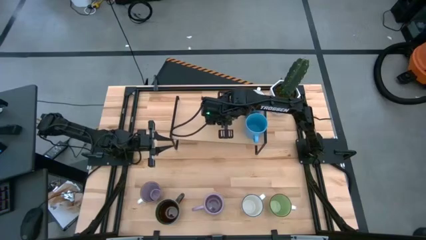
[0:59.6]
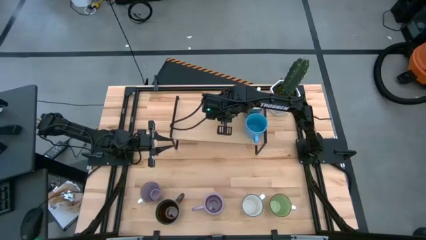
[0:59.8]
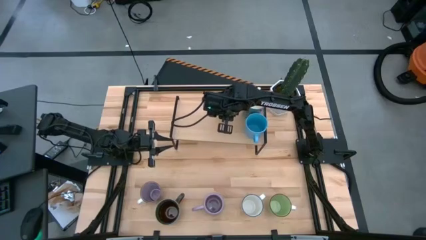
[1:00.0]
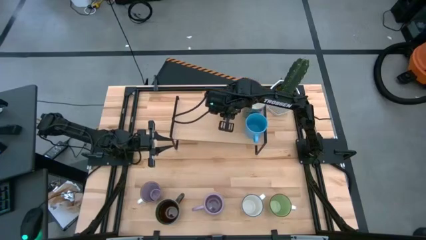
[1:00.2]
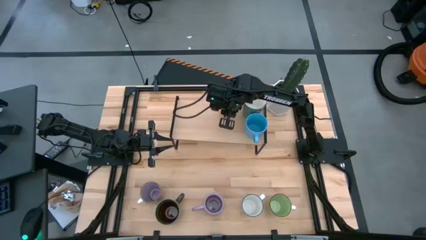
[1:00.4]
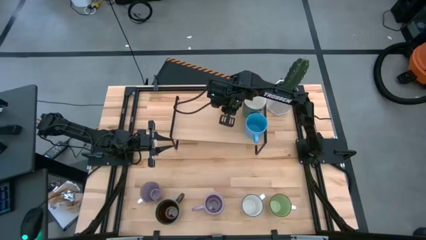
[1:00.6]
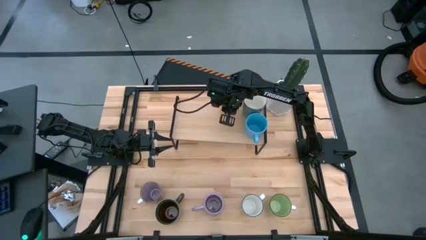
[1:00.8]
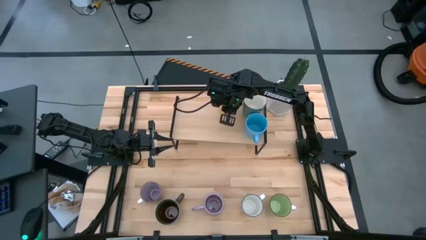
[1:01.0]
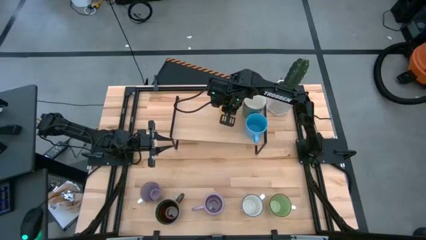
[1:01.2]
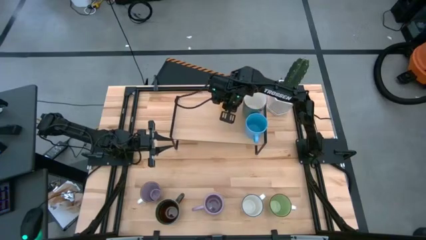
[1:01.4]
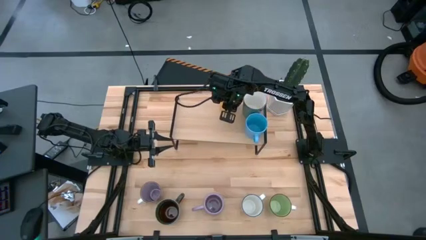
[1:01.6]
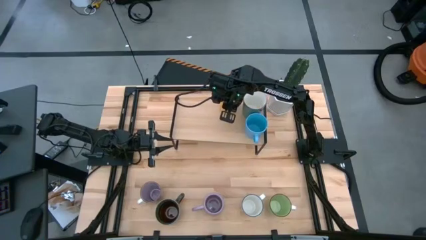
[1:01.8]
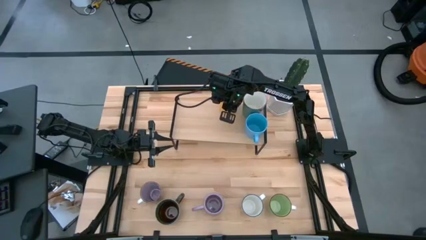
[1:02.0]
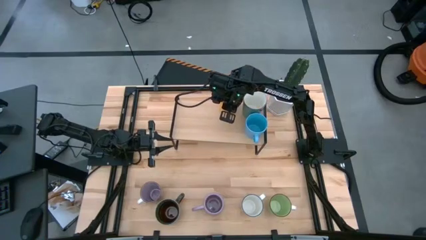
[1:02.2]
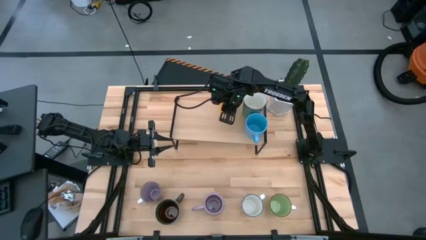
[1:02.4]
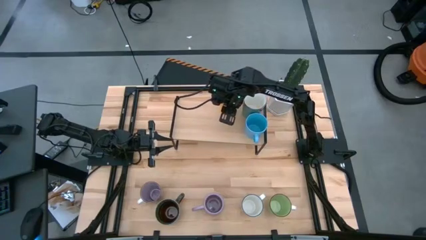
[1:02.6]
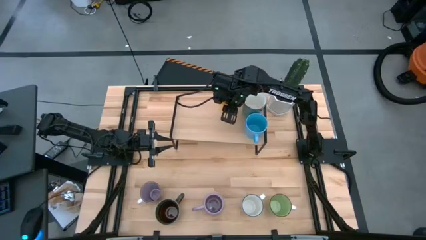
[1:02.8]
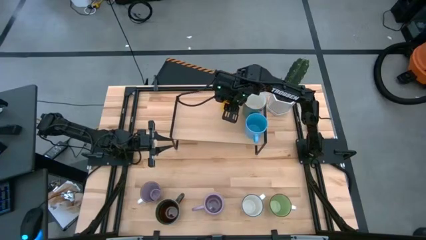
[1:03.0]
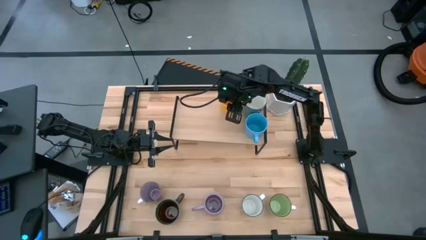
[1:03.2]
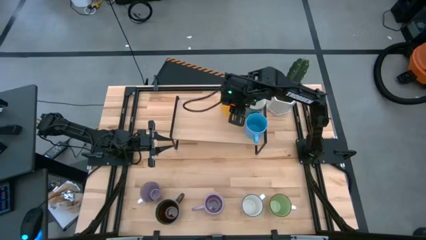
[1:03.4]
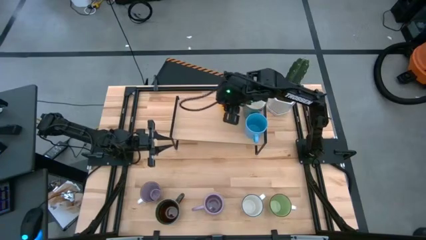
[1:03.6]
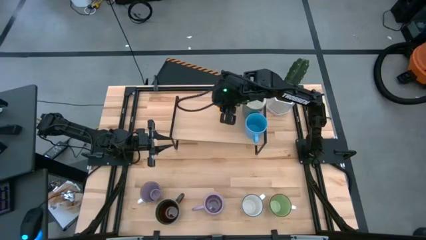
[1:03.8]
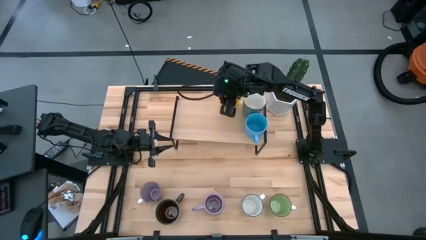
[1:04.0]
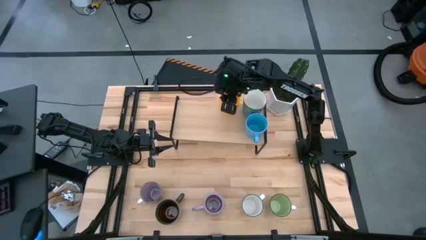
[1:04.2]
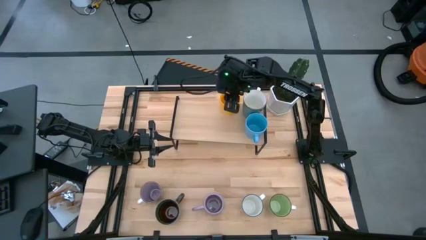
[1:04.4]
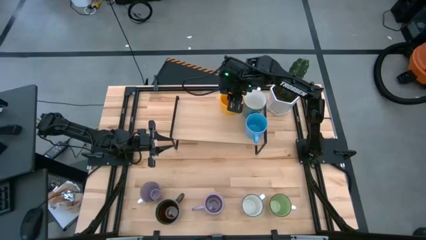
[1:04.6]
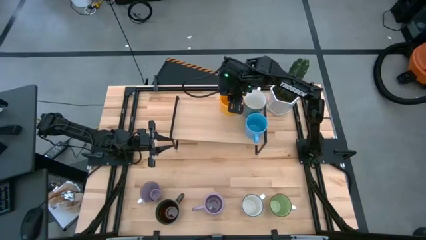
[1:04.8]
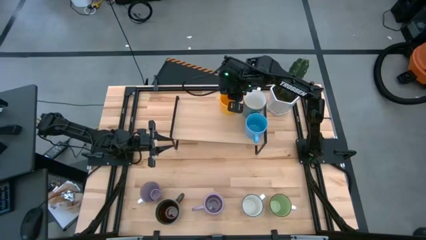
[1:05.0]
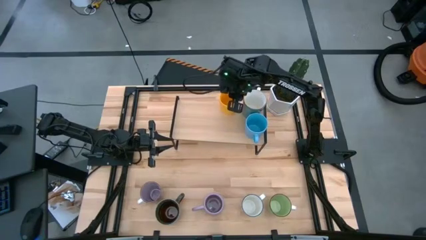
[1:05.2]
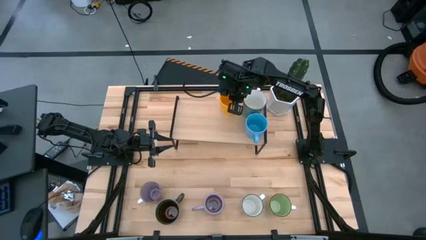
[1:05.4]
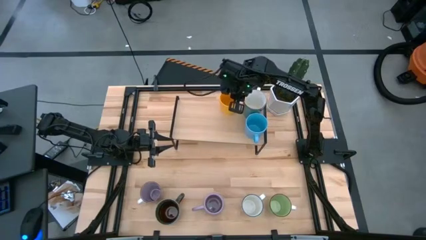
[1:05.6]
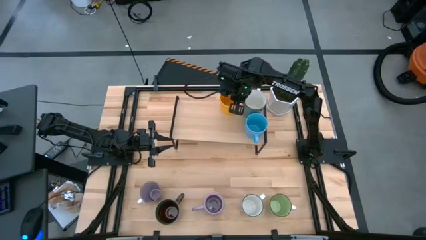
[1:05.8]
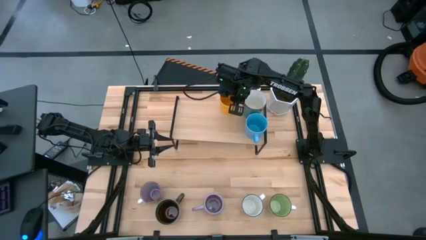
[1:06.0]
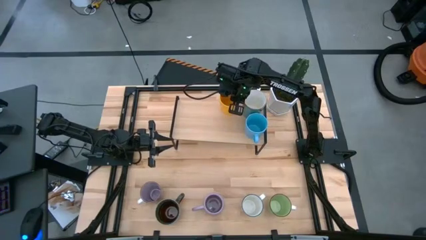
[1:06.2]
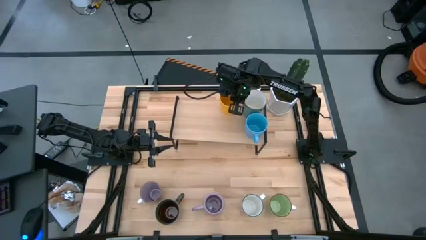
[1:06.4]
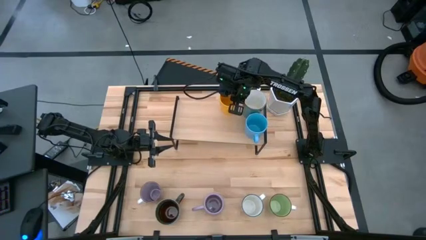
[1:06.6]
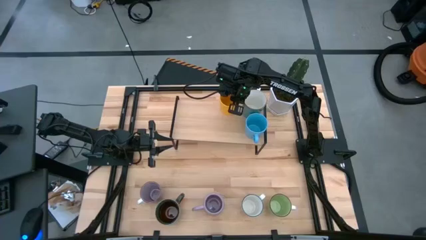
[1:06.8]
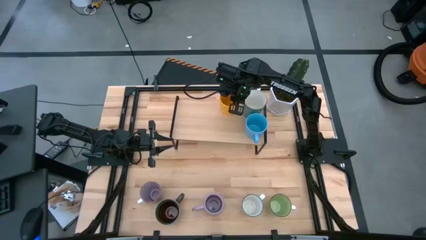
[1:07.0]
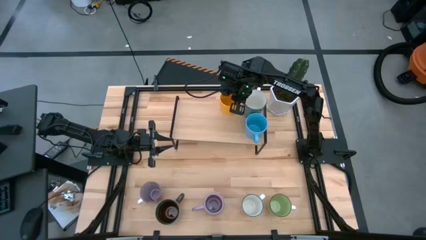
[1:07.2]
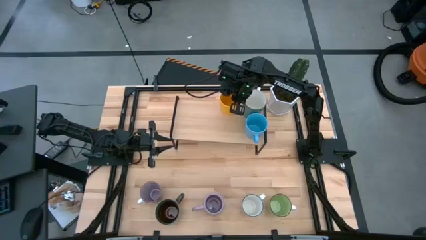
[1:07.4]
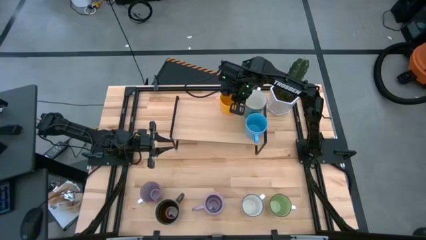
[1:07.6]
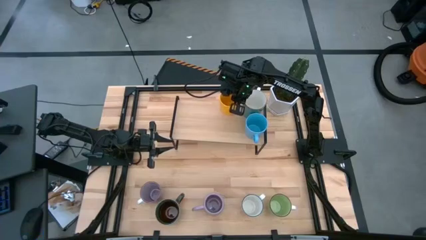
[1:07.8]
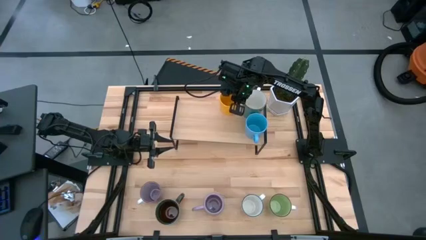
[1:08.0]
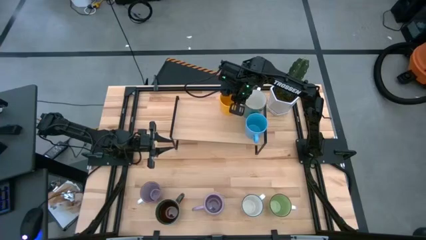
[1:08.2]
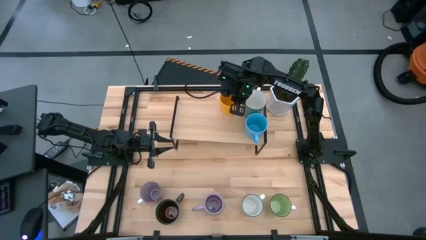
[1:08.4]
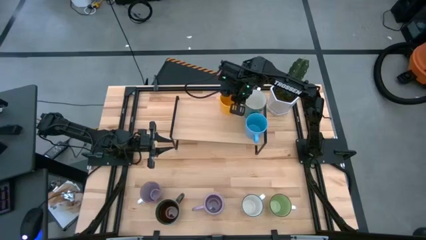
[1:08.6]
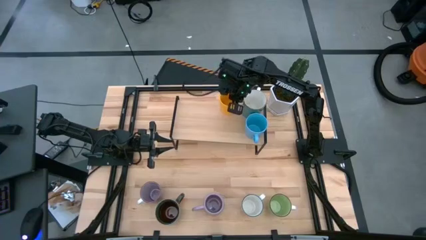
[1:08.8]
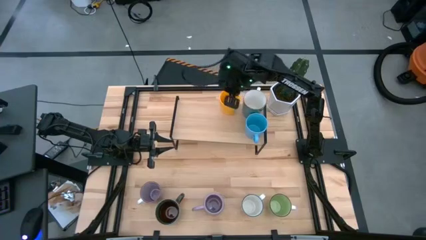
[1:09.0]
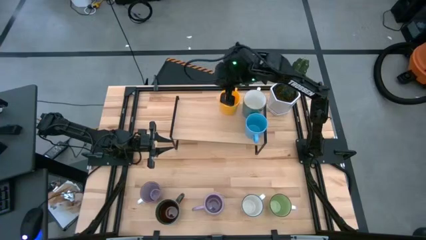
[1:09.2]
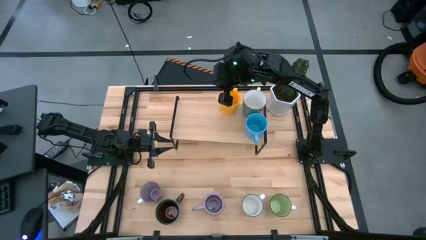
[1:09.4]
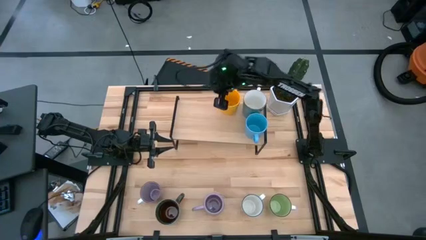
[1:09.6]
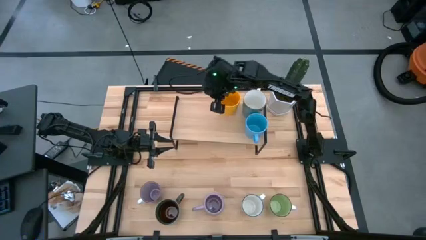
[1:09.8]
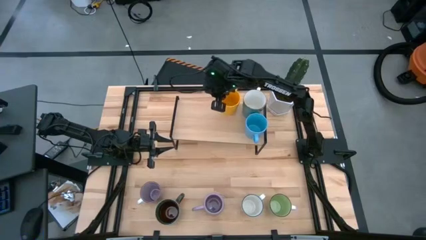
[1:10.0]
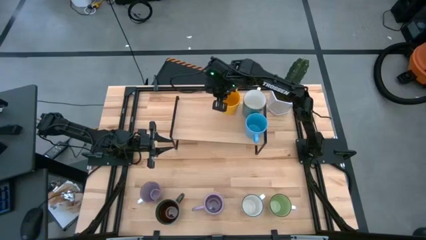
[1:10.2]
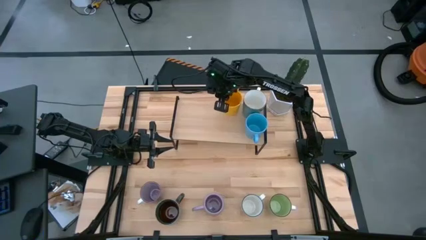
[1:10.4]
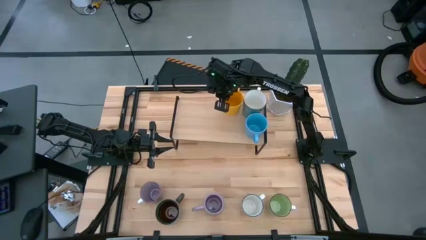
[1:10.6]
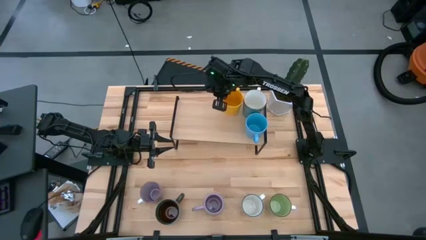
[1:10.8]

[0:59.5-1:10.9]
Task: Place coffee mugs
Put the yellow mug on the shelf
